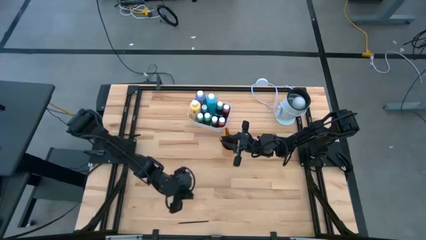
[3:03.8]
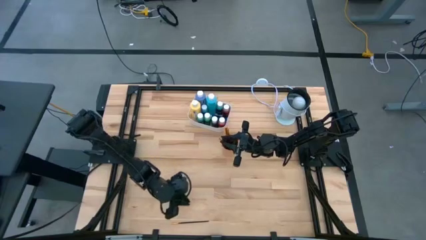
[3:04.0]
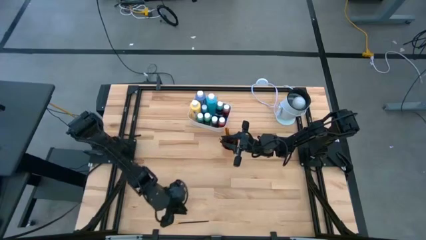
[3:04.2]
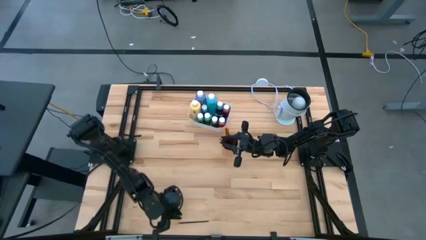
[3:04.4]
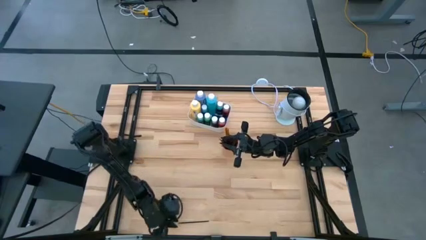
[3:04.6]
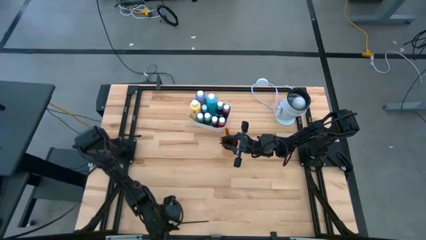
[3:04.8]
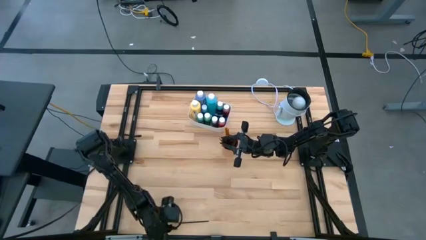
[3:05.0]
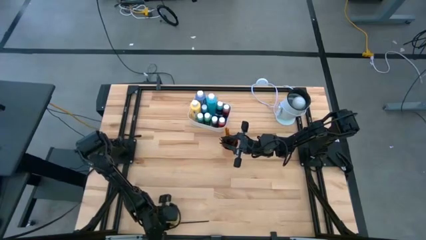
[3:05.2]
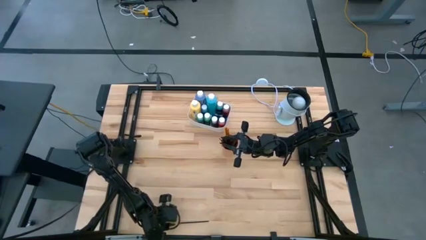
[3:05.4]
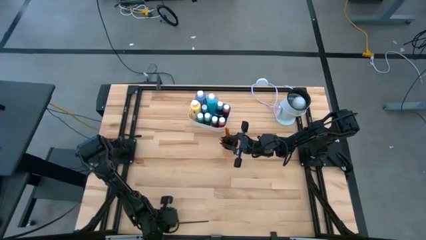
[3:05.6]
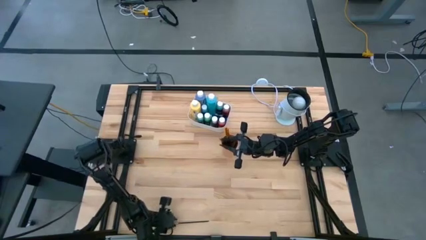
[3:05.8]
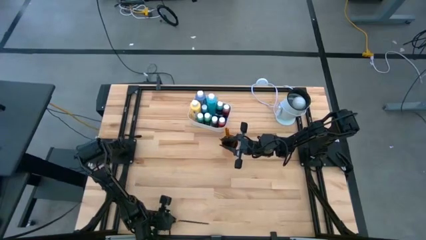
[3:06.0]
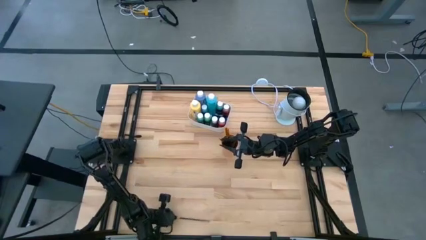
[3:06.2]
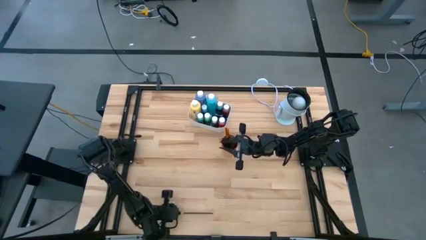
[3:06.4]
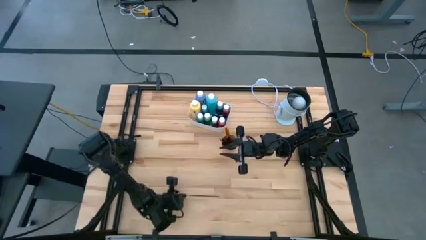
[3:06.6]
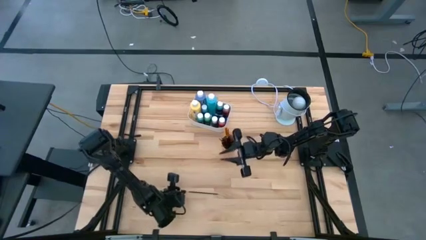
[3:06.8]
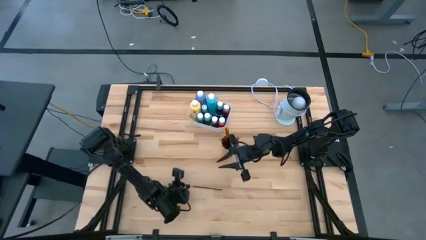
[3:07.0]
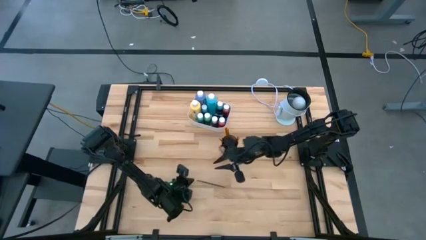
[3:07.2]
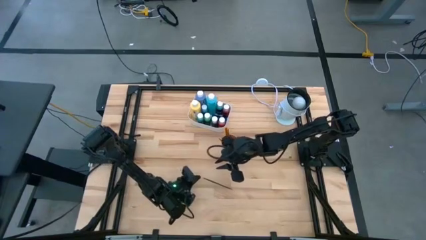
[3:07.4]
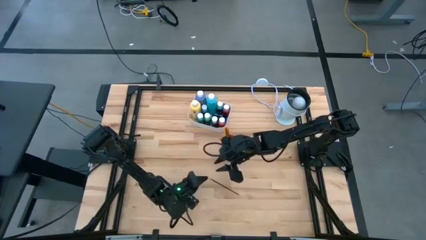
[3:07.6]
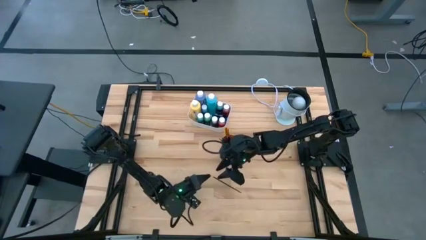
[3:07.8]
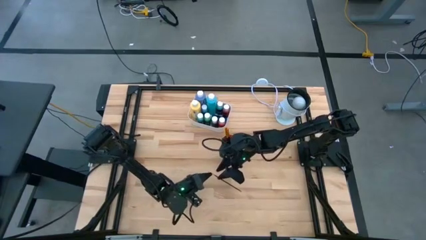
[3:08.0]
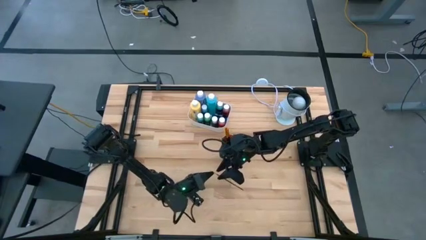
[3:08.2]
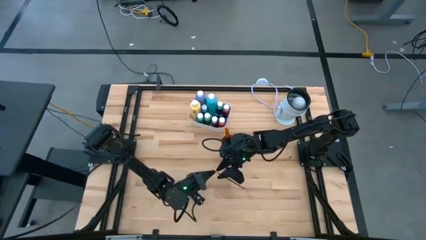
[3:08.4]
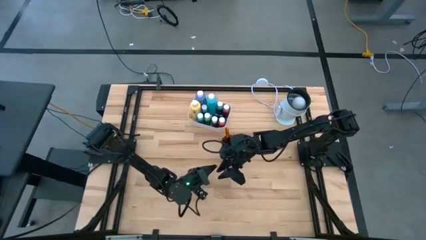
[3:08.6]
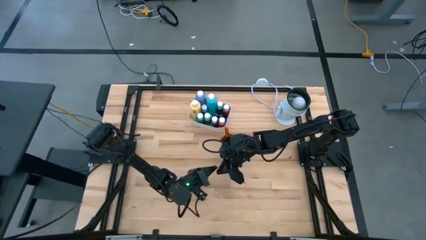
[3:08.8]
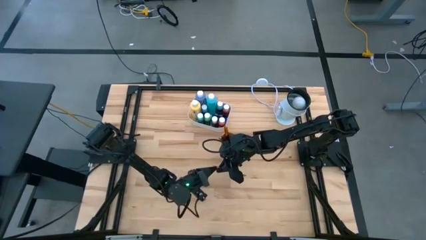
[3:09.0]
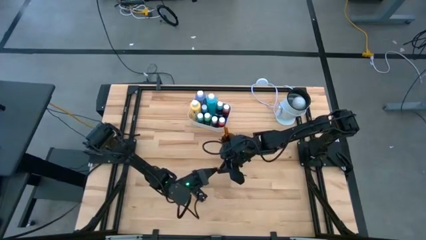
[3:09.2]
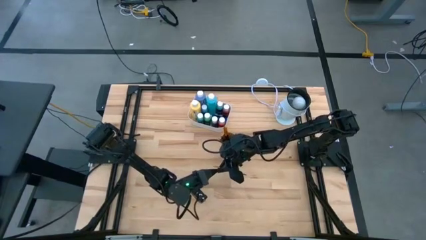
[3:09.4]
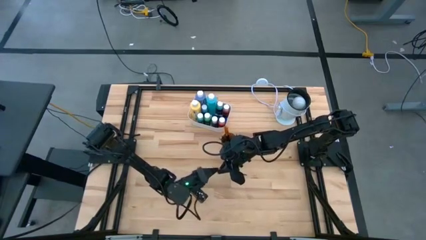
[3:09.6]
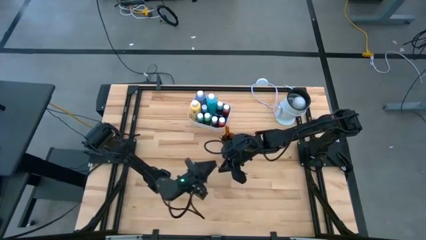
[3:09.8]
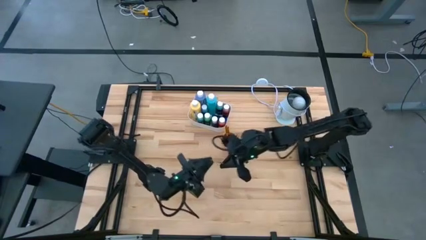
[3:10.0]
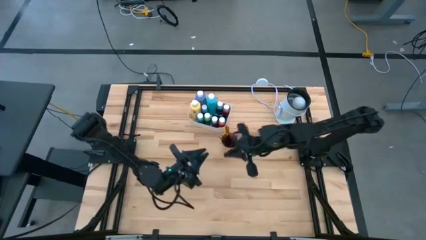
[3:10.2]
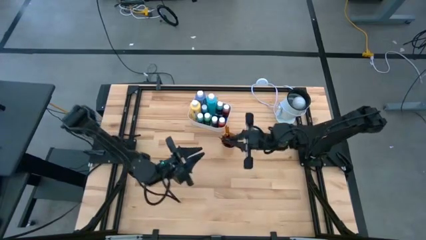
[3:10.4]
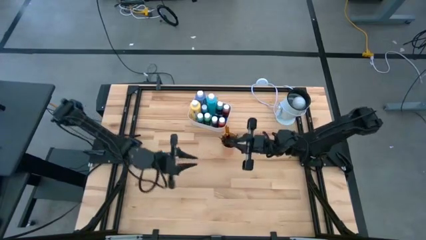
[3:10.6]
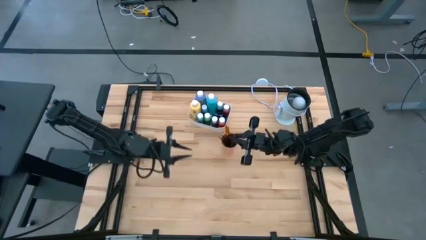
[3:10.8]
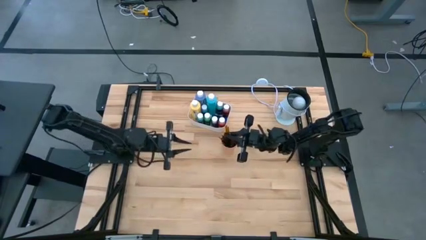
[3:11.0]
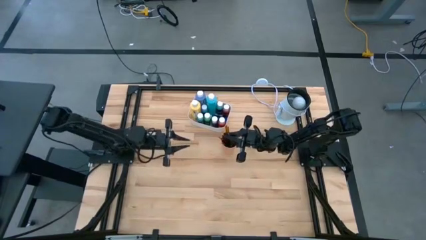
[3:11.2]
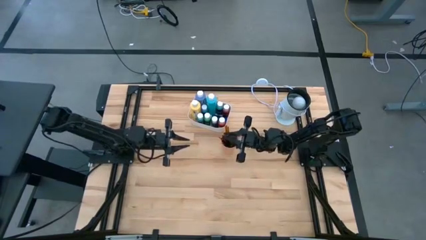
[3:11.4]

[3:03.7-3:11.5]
Task: Pick & Place Paint Supplies
Put the black paint brush into the orange cup

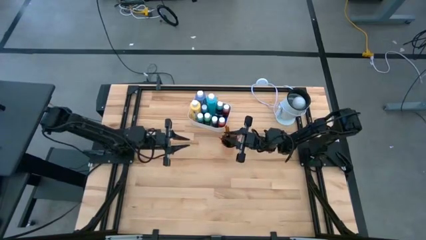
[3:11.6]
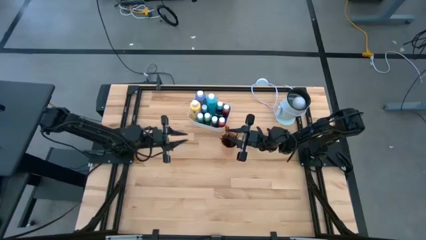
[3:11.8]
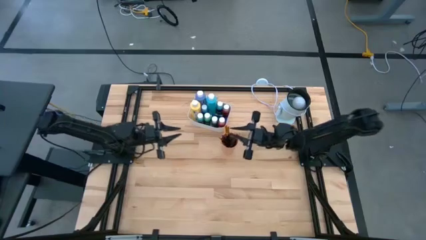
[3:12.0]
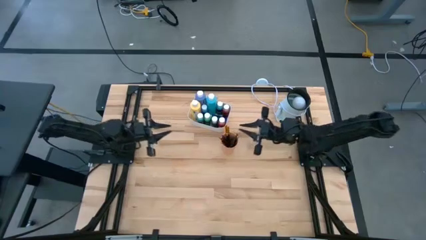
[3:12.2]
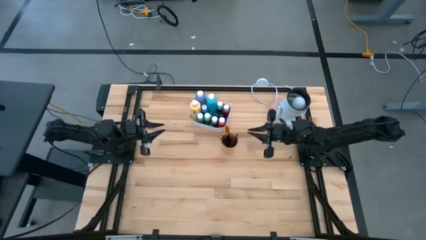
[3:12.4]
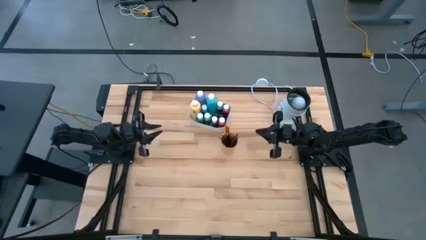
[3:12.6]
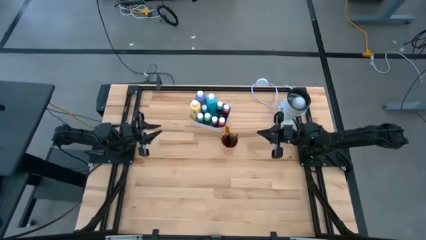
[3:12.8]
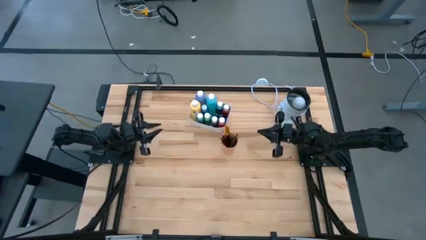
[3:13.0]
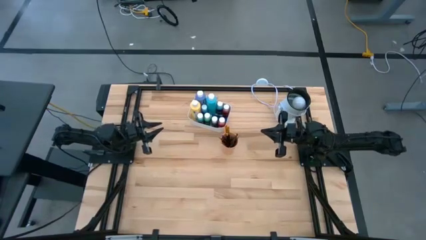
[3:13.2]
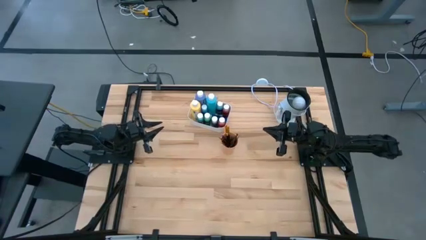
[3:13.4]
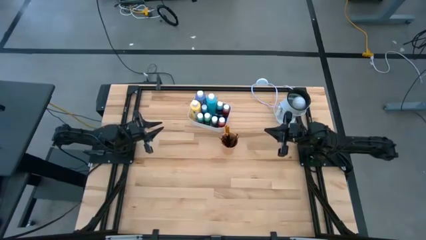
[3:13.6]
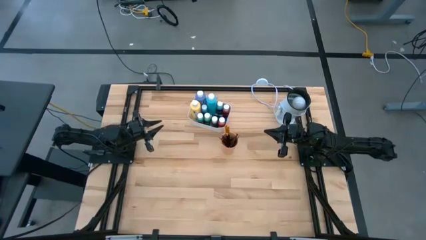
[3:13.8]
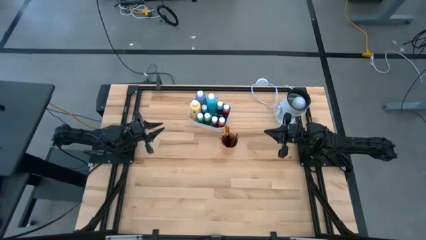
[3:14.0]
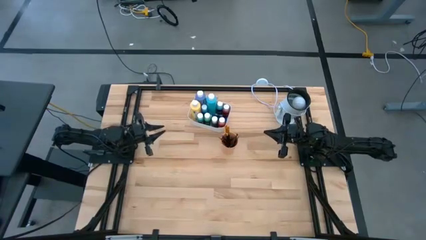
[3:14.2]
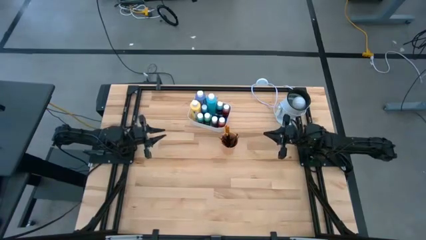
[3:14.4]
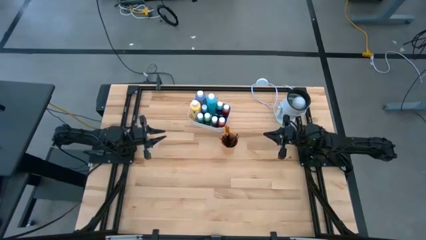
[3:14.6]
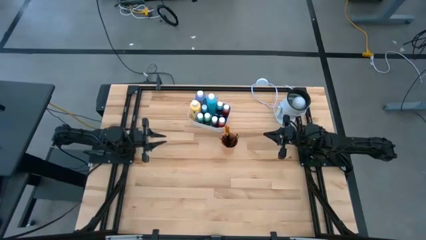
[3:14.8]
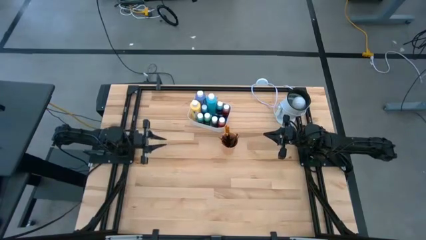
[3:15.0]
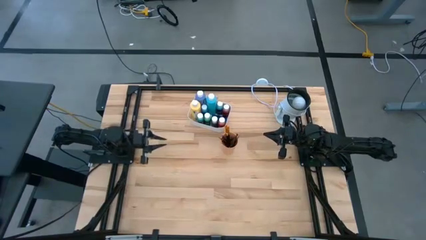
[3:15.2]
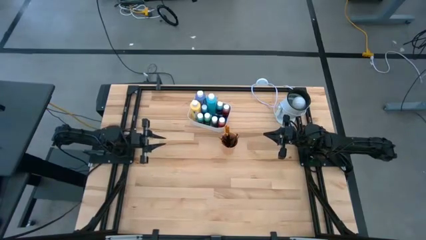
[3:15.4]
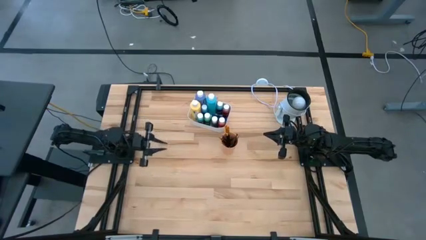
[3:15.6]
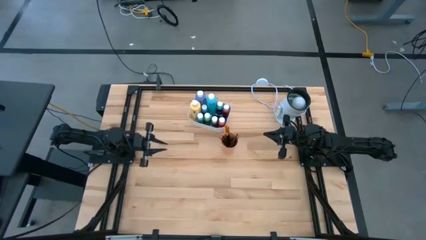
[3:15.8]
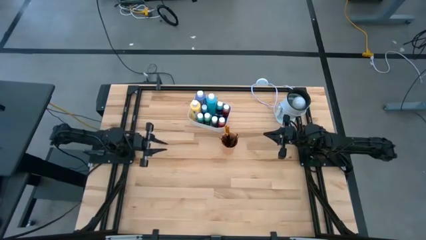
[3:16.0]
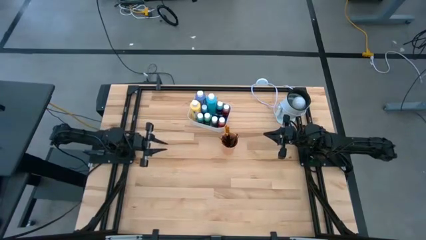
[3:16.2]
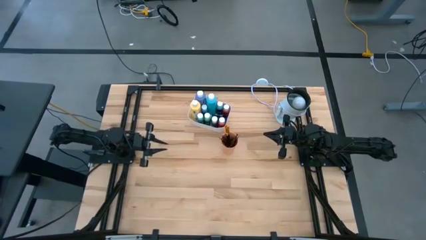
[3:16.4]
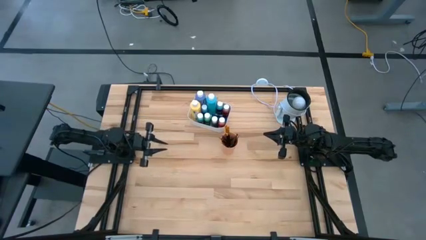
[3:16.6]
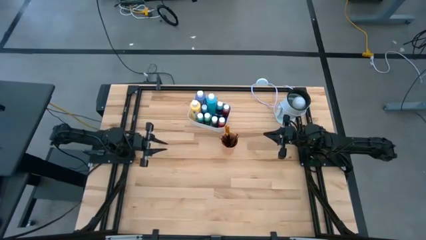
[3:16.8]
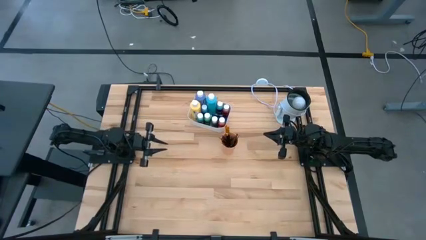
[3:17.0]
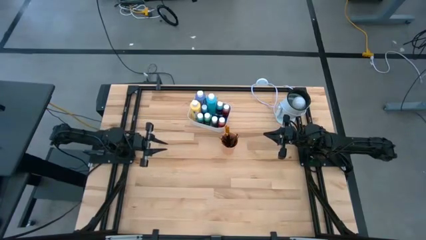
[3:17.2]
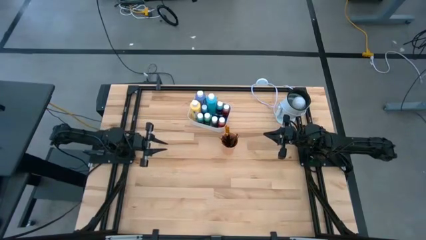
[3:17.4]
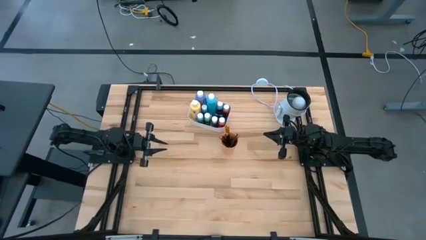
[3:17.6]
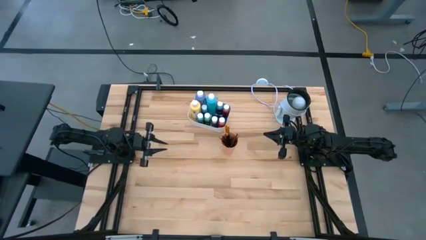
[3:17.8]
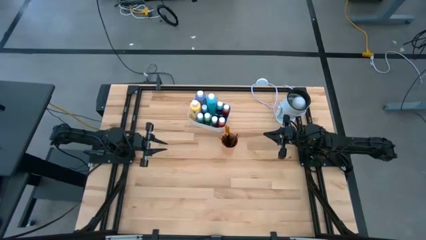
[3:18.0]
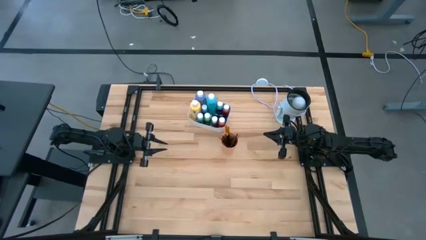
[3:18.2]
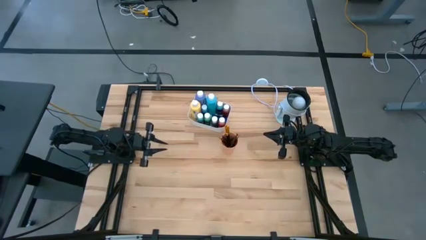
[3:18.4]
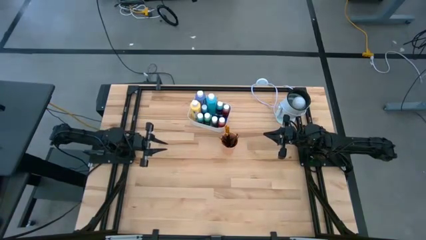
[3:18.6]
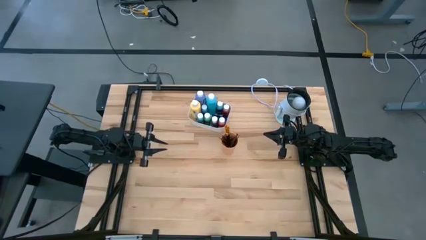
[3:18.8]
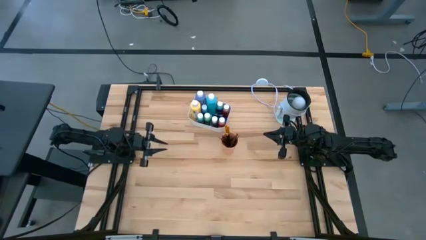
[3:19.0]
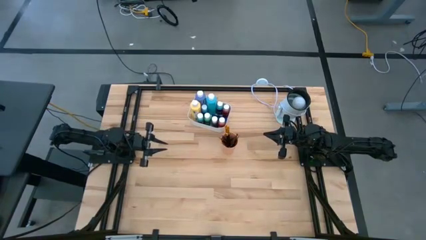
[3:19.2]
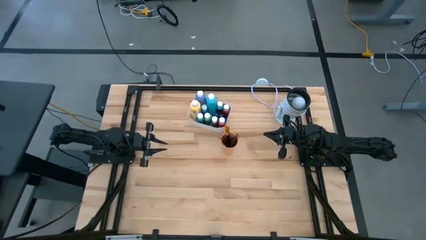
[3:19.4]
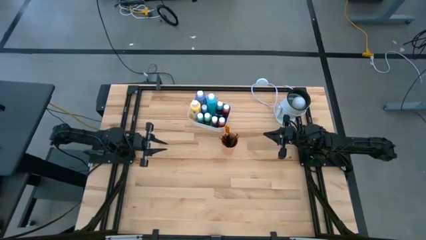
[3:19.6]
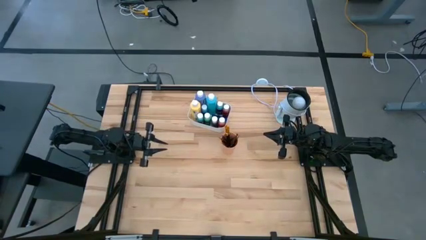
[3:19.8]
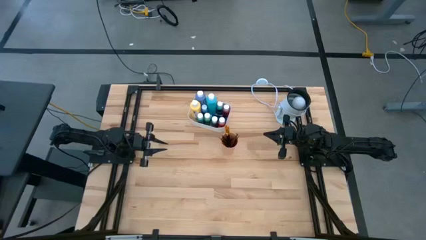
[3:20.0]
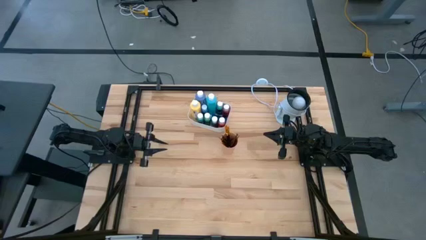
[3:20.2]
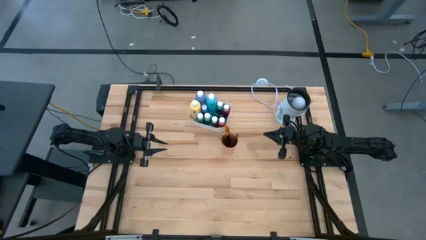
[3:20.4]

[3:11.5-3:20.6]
Return to Home Position
